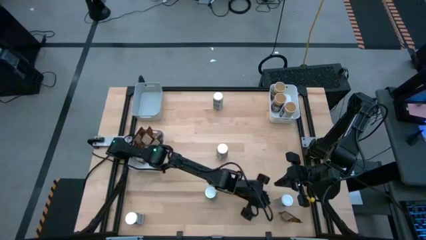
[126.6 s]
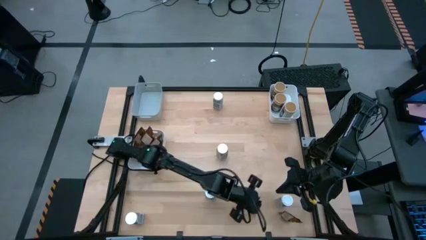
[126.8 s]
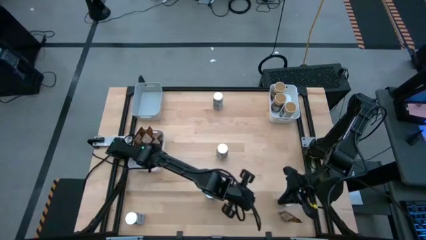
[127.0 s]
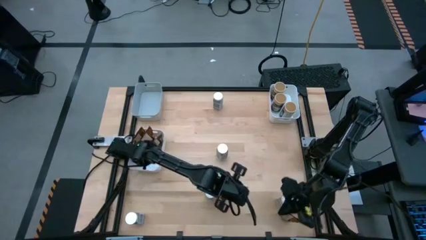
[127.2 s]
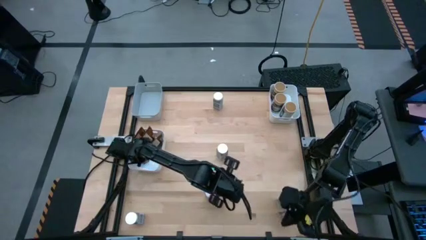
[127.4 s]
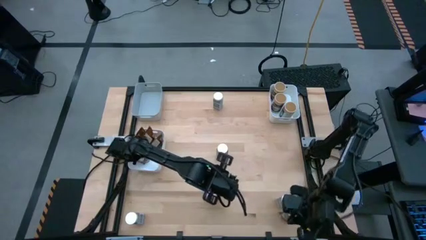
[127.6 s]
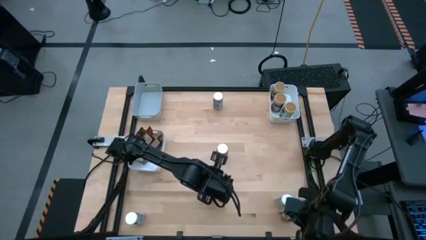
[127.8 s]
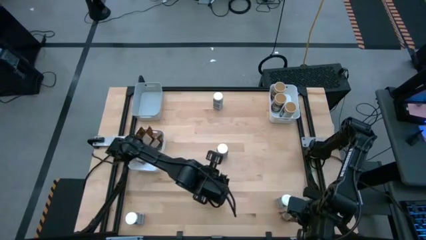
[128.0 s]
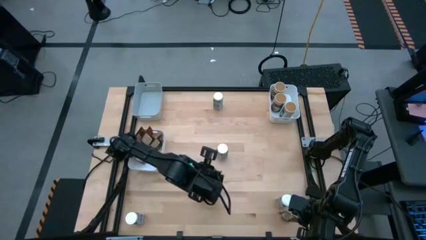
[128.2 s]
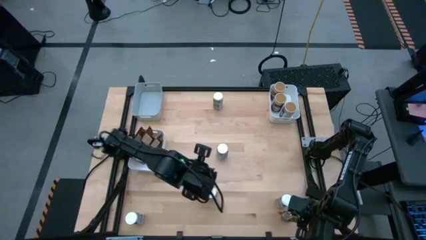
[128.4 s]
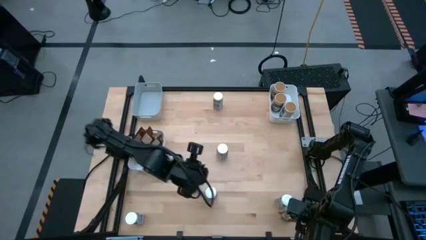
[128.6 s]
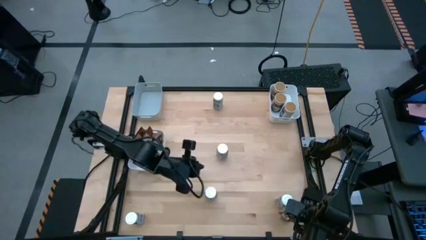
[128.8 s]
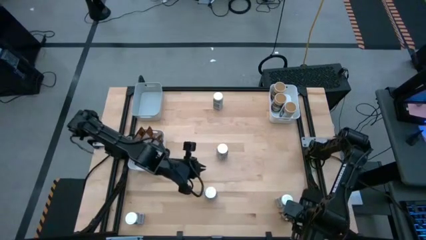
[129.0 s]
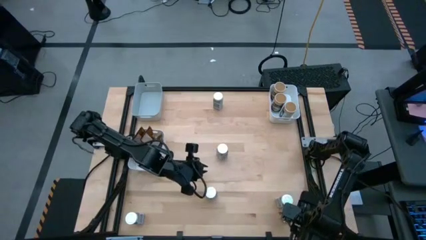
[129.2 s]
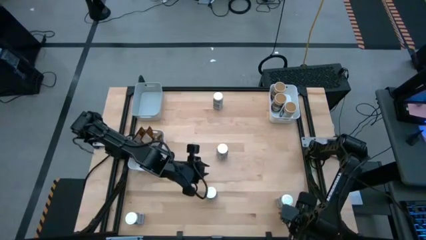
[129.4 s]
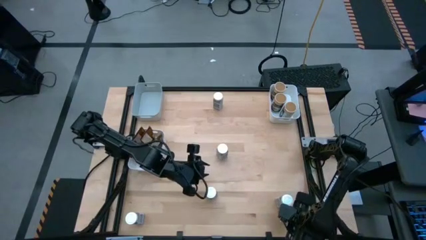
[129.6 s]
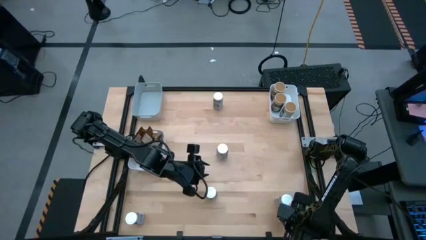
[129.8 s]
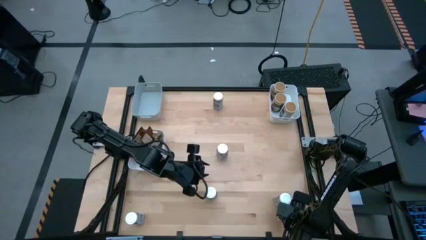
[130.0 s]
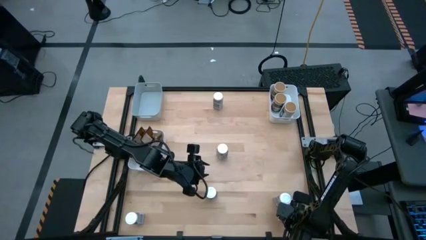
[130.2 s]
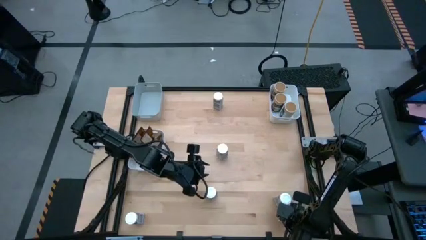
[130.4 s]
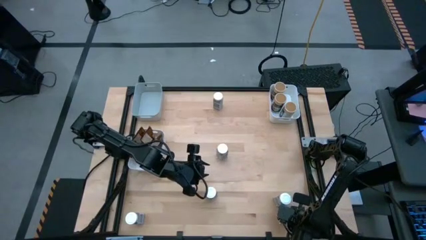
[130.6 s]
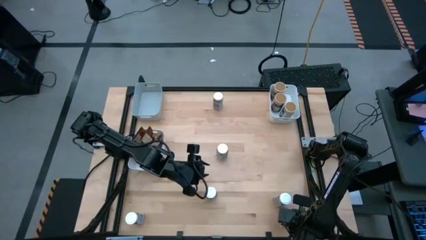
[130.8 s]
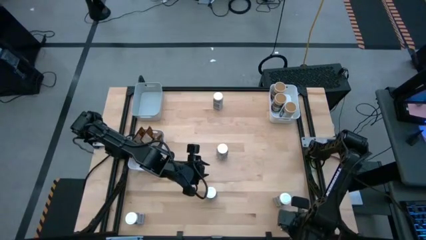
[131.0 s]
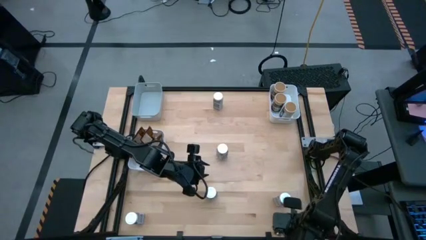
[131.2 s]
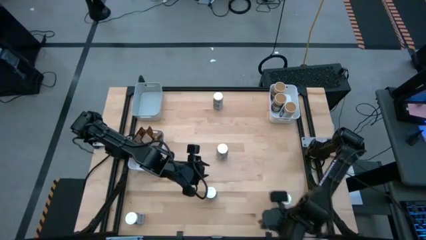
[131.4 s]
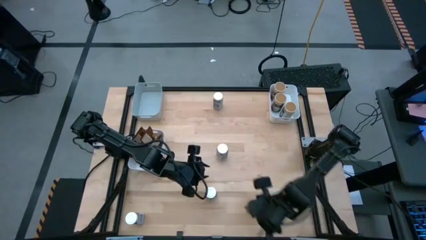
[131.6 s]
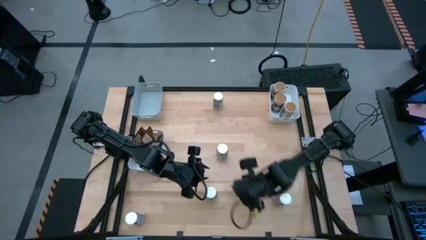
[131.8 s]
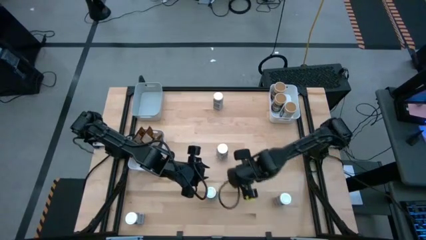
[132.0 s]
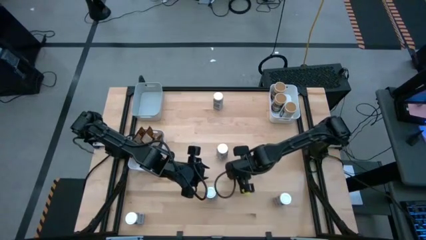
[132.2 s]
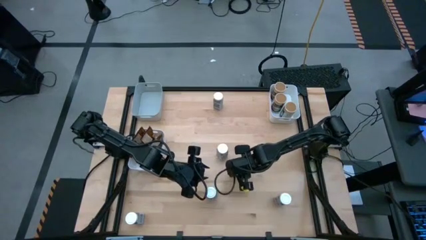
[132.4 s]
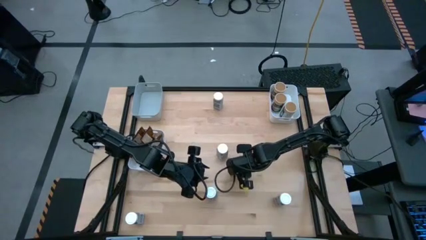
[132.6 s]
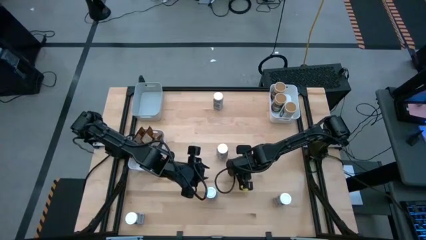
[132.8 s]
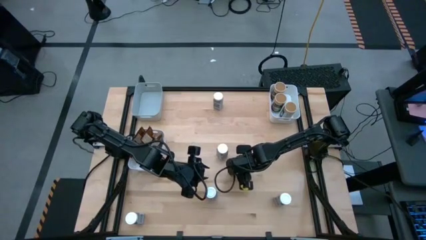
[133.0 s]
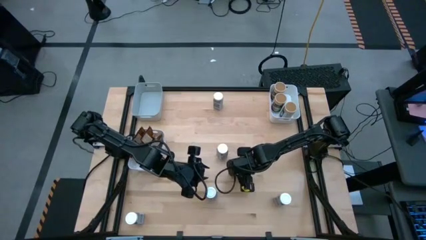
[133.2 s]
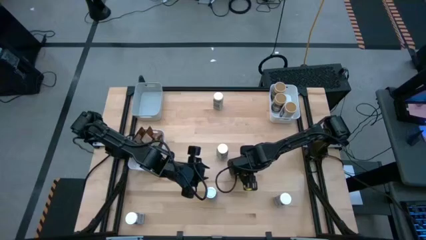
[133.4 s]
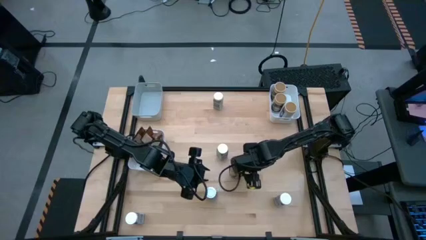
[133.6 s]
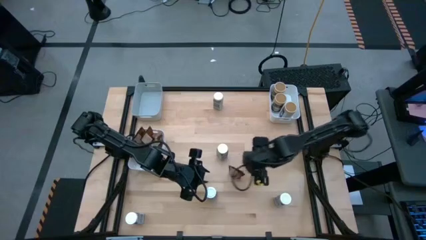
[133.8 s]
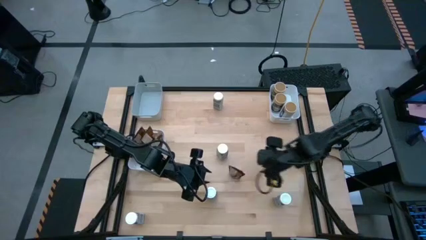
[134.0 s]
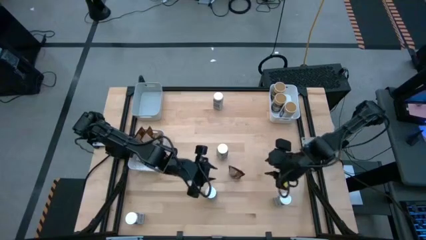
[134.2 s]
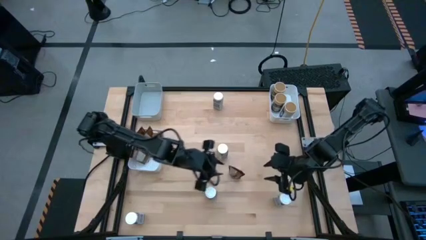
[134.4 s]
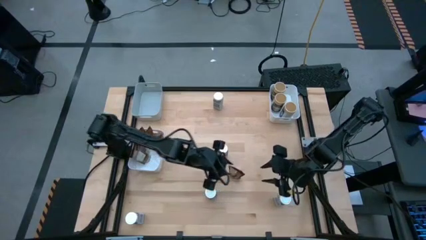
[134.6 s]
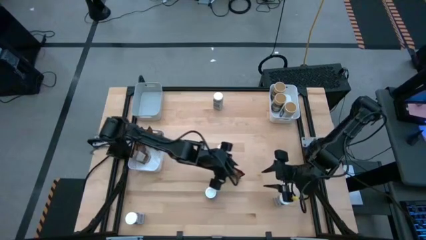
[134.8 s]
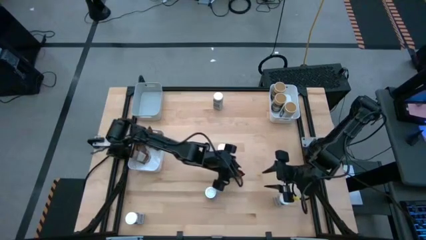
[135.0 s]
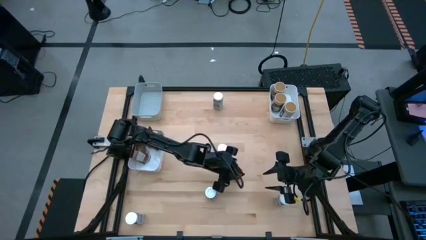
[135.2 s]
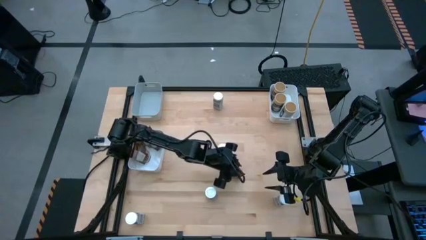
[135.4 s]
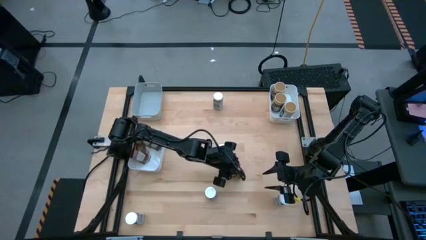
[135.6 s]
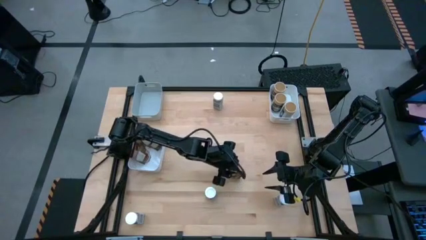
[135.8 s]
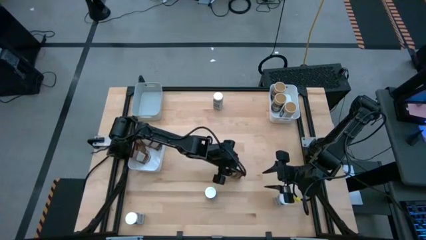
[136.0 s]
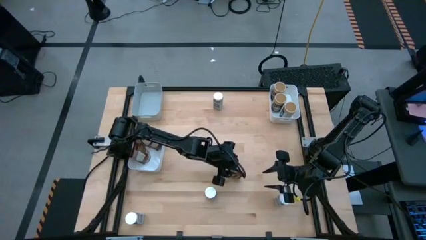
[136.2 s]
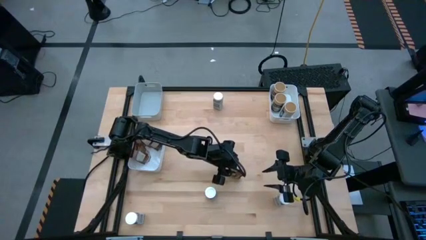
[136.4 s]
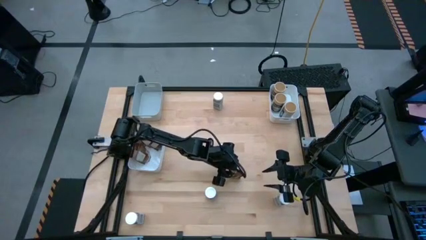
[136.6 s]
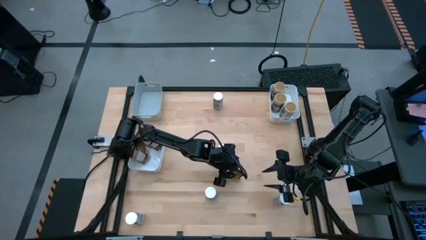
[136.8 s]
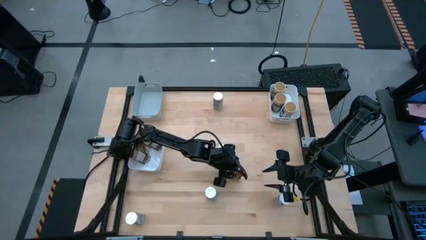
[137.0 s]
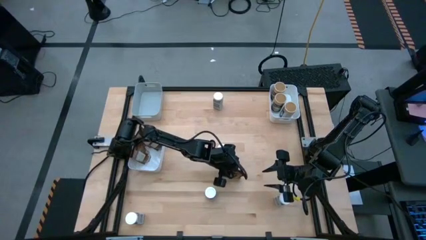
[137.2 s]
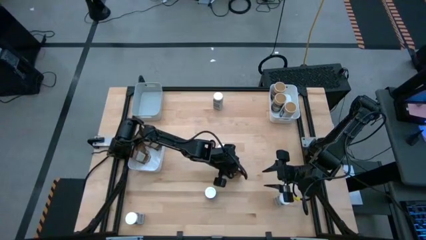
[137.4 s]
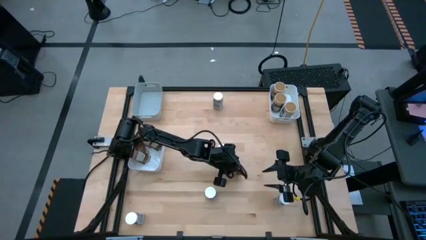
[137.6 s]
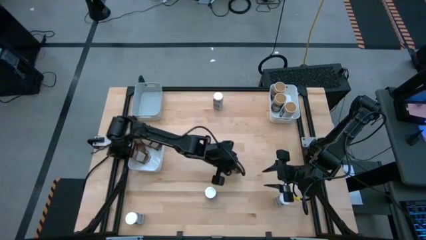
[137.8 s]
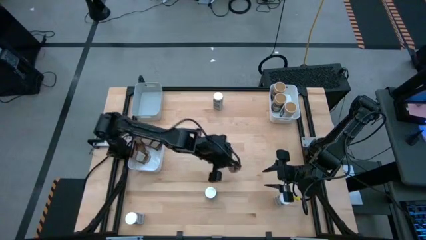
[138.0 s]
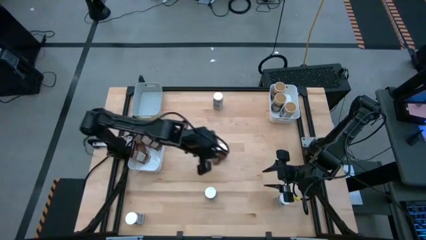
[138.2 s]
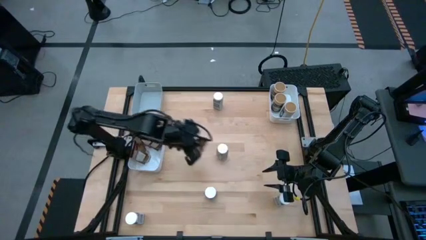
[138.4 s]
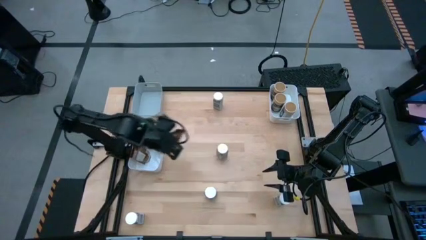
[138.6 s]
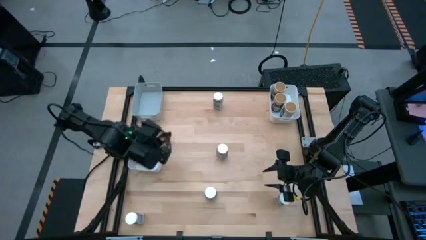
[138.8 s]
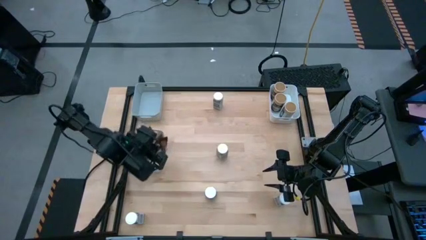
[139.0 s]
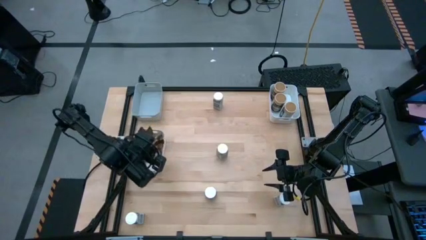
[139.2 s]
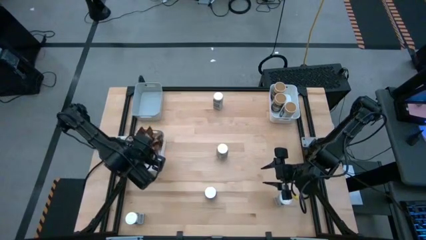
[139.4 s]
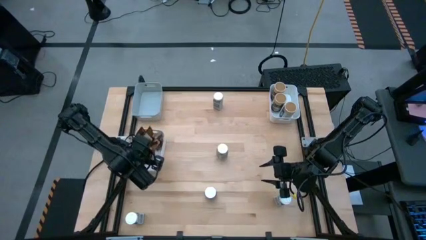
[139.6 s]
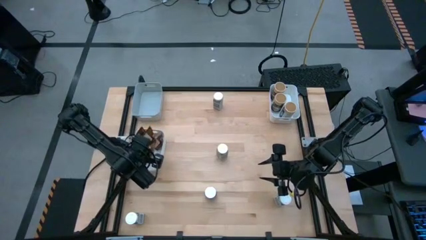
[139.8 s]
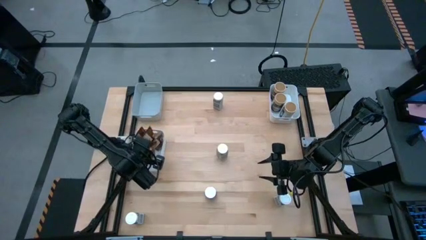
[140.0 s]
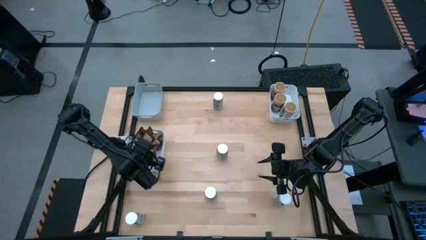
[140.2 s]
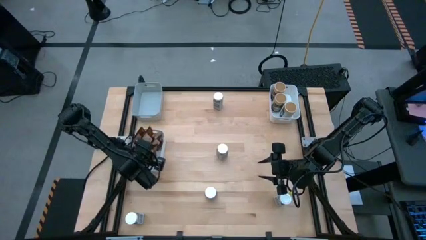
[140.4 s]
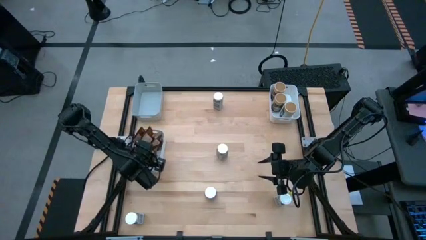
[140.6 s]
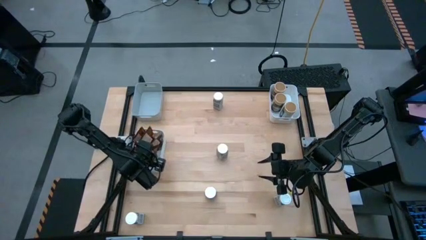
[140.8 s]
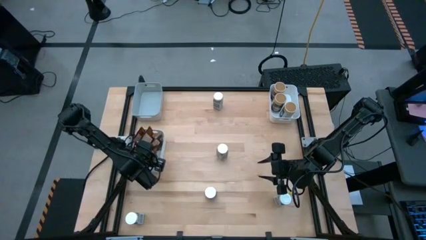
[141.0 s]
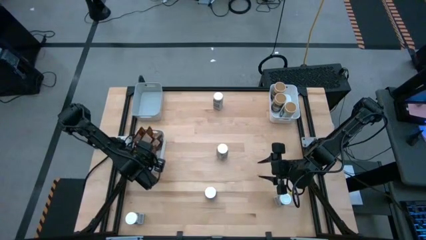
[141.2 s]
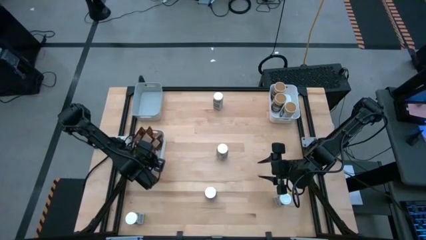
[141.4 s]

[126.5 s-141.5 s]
Task: Sort spices by type
Put the orange seasoning pack into the left white bin
